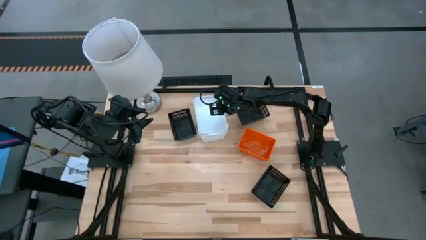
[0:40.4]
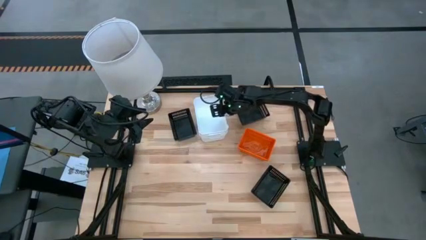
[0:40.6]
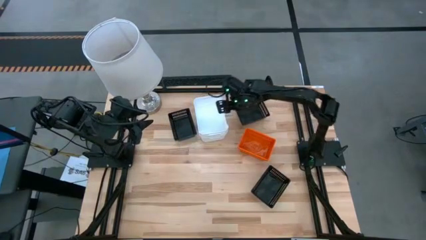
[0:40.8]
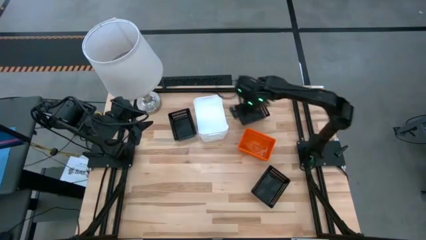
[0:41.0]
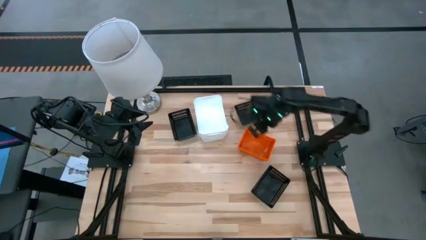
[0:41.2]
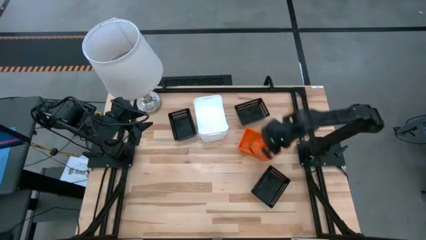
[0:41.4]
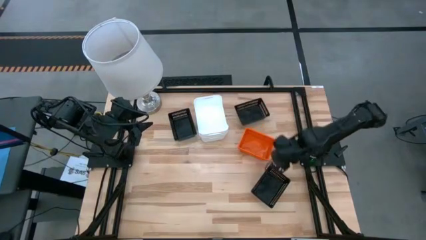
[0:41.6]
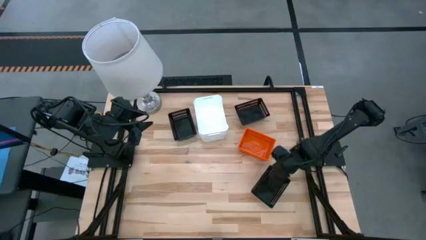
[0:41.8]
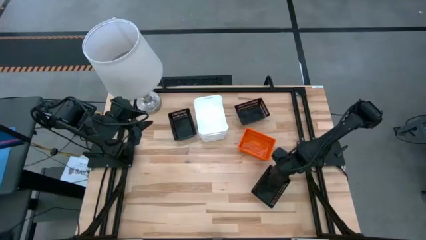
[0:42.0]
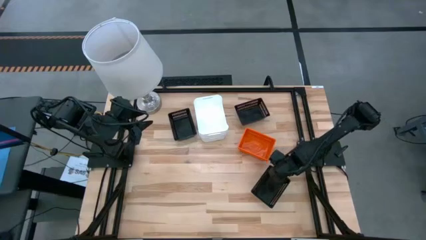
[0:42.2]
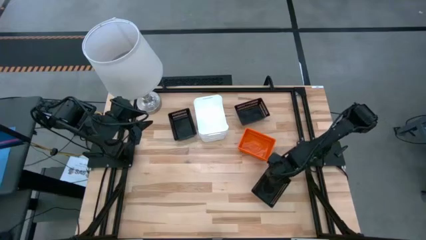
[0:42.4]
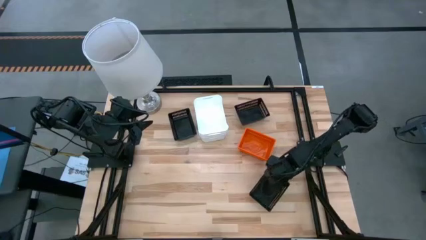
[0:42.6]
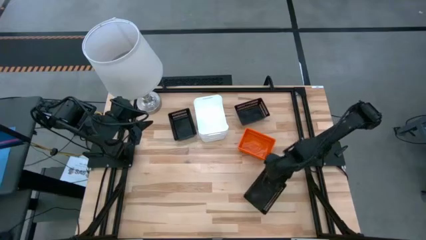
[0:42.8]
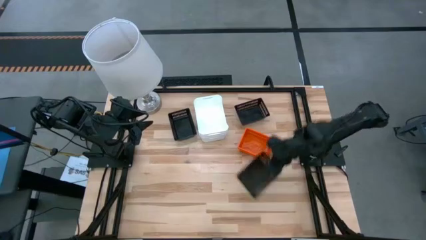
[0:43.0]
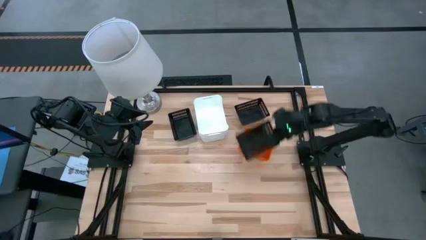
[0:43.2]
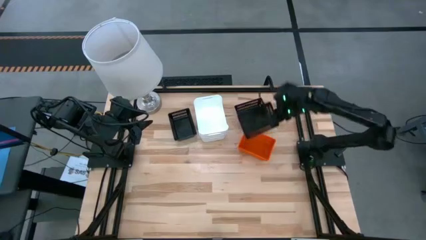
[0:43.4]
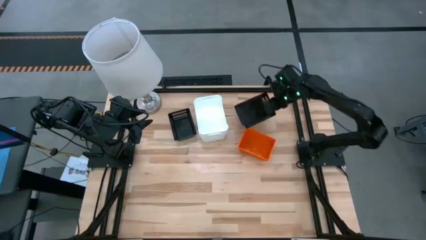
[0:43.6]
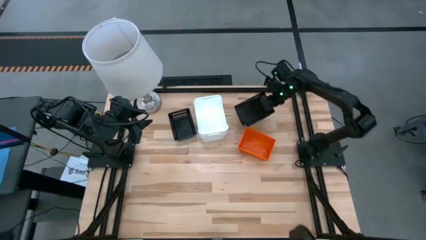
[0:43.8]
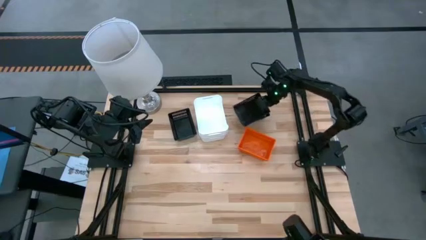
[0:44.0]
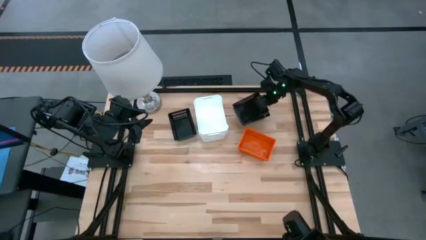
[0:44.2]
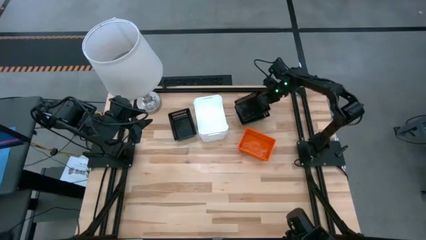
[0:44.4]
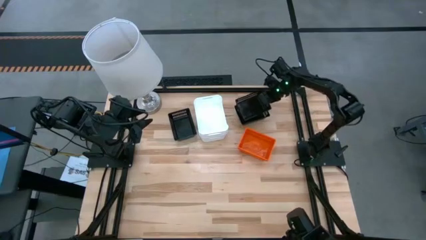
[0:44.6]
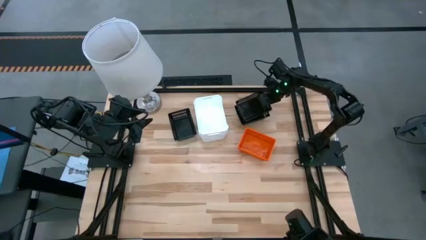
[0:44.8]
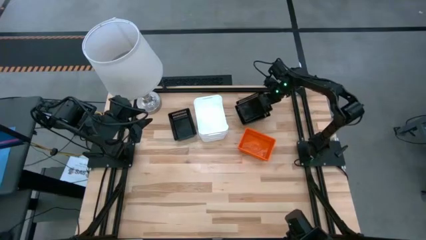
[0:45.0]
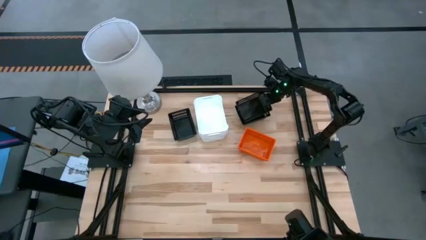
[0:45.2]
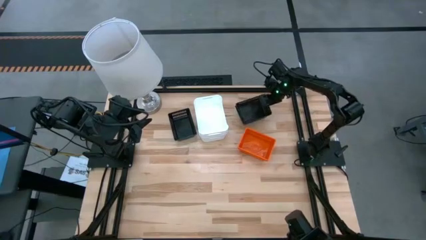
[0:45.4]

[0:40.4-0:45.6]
Stack the bottom black bin on the top right black bin

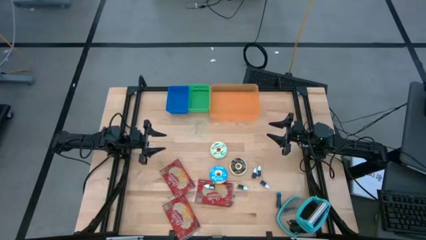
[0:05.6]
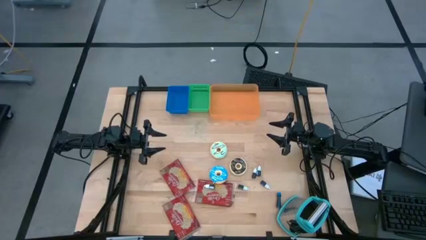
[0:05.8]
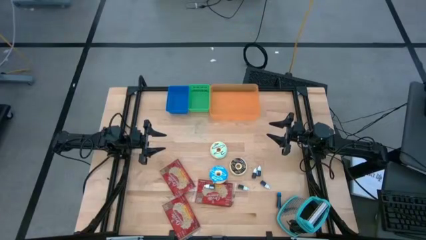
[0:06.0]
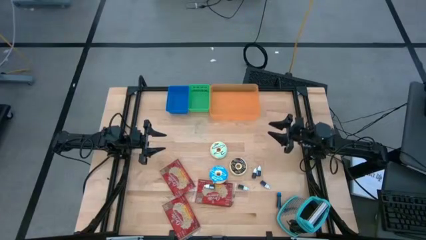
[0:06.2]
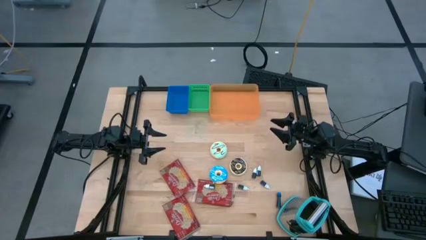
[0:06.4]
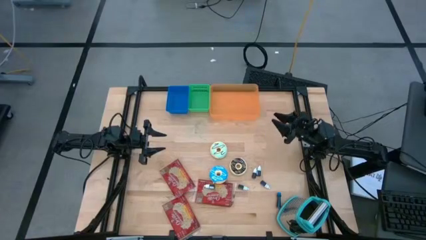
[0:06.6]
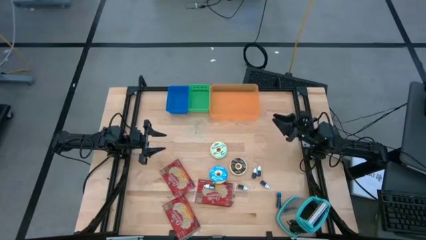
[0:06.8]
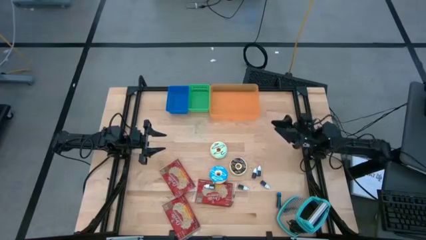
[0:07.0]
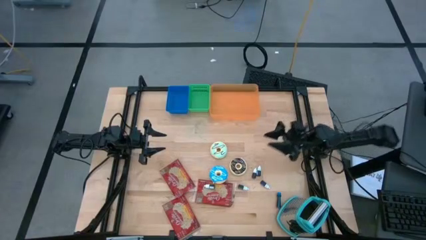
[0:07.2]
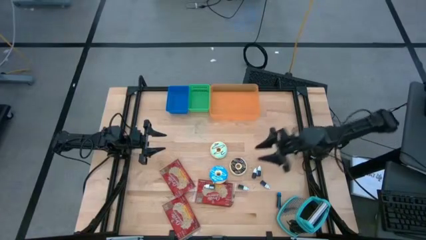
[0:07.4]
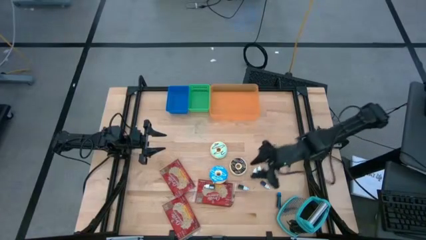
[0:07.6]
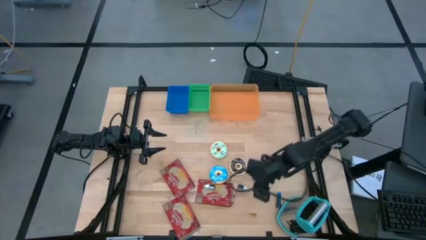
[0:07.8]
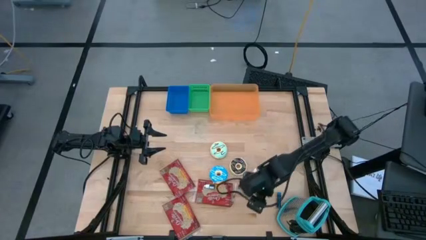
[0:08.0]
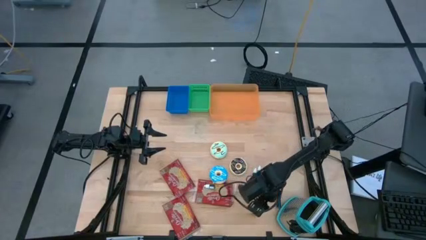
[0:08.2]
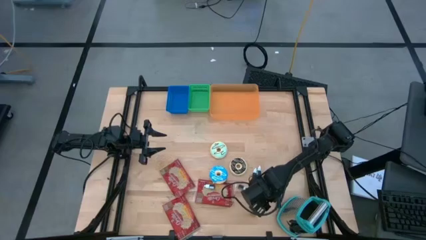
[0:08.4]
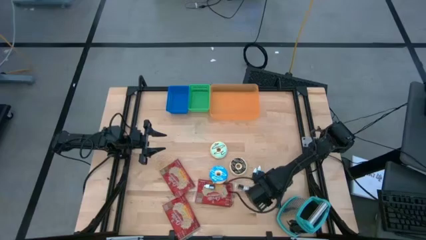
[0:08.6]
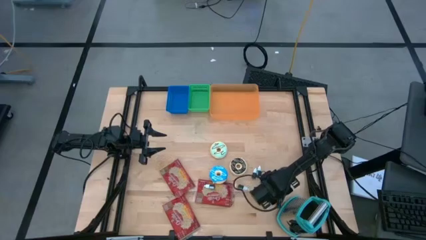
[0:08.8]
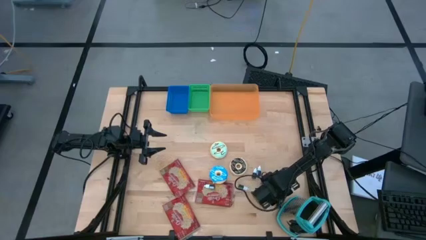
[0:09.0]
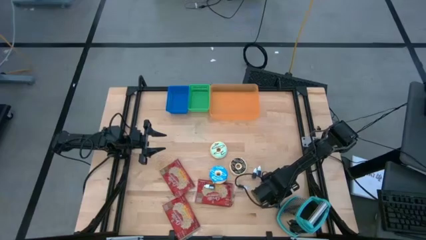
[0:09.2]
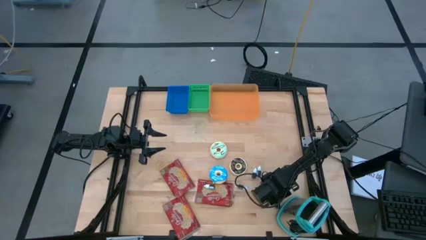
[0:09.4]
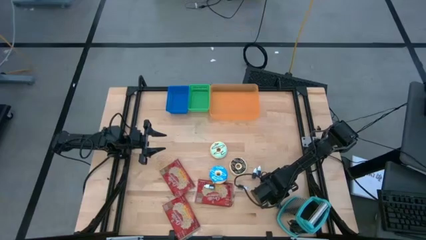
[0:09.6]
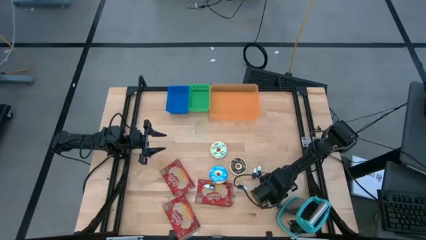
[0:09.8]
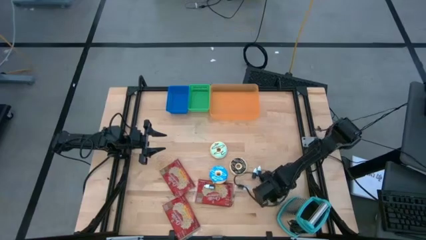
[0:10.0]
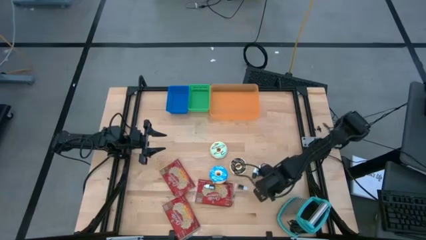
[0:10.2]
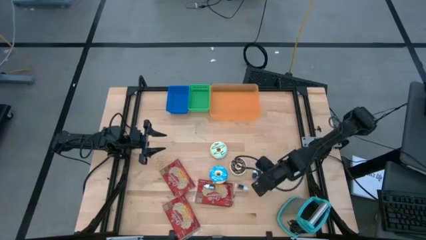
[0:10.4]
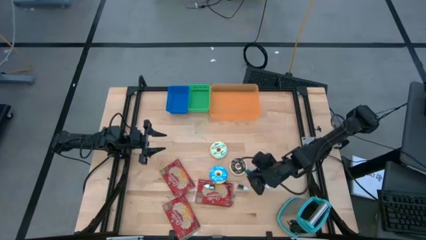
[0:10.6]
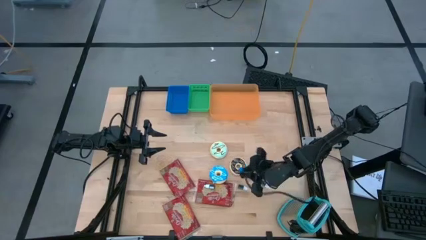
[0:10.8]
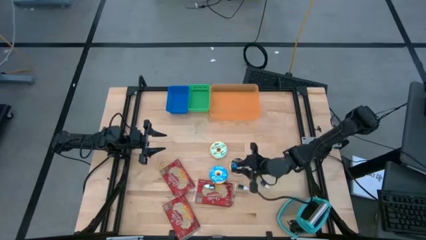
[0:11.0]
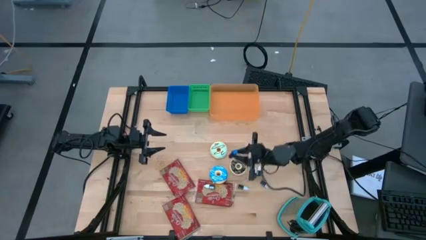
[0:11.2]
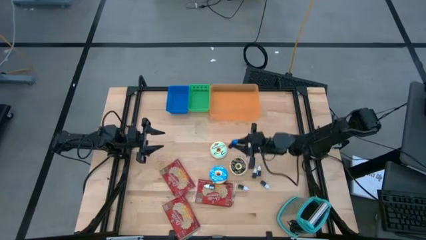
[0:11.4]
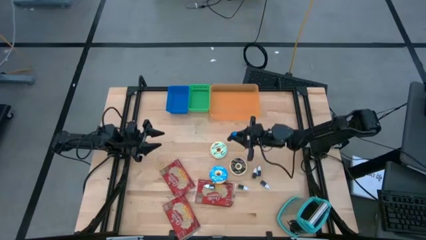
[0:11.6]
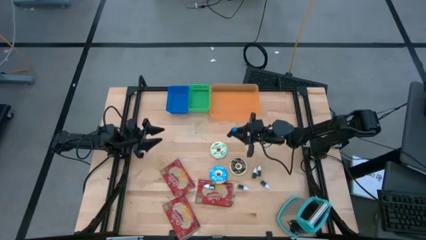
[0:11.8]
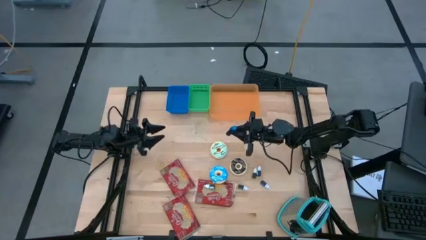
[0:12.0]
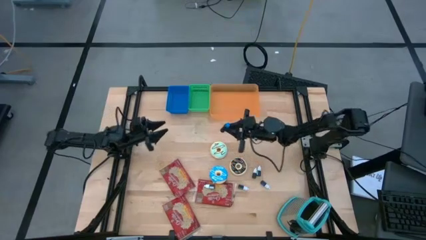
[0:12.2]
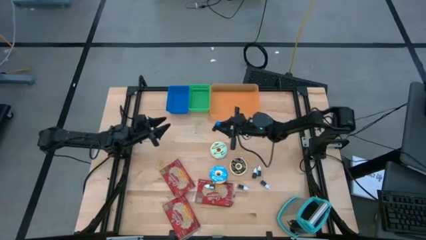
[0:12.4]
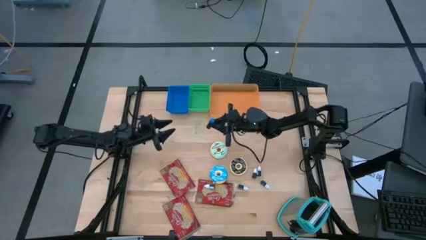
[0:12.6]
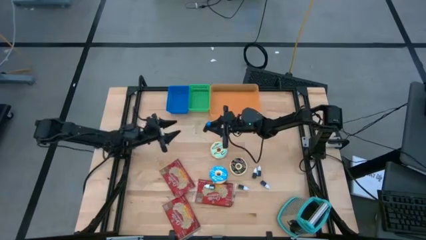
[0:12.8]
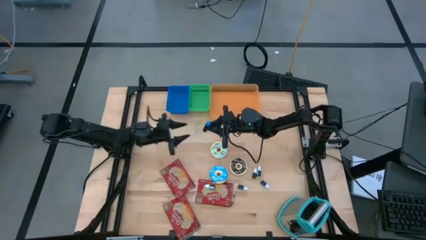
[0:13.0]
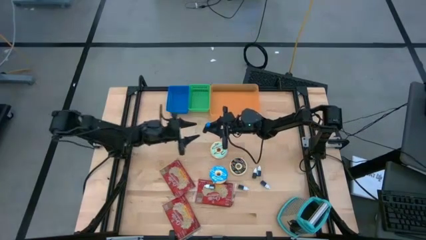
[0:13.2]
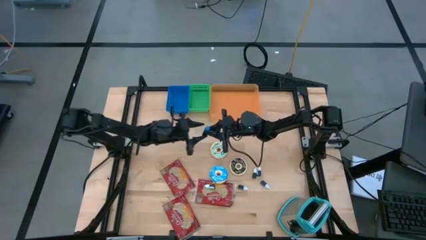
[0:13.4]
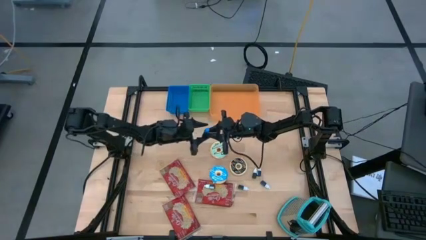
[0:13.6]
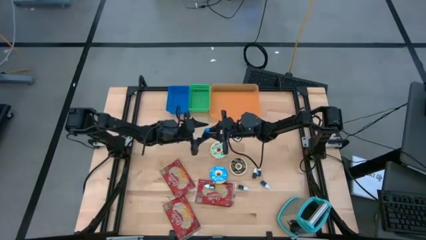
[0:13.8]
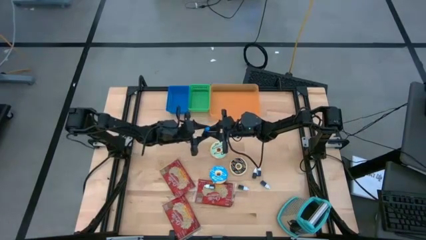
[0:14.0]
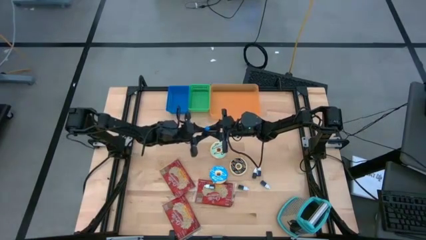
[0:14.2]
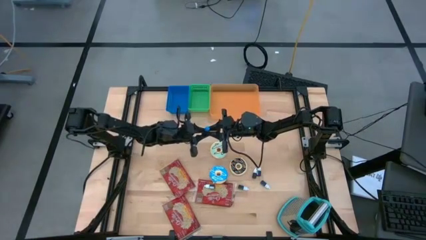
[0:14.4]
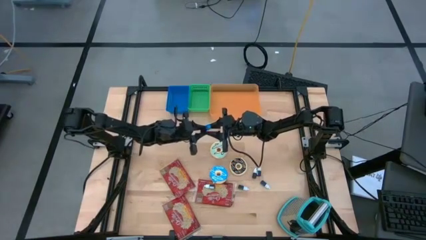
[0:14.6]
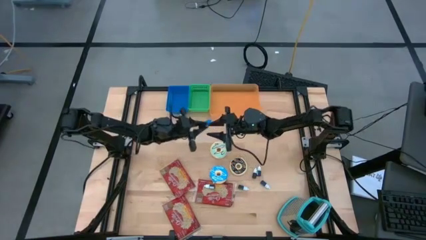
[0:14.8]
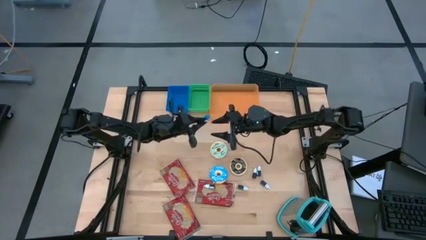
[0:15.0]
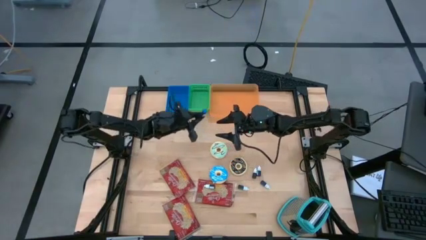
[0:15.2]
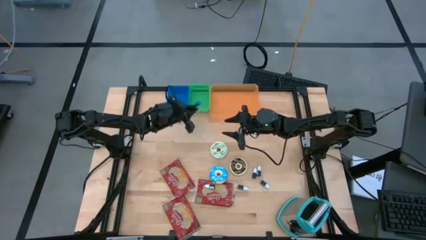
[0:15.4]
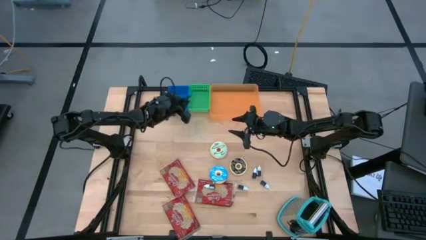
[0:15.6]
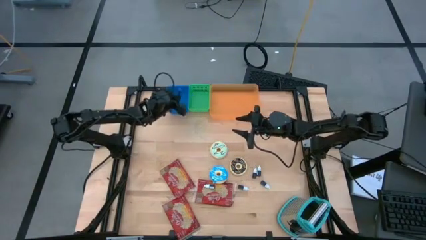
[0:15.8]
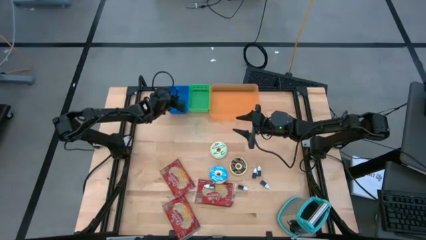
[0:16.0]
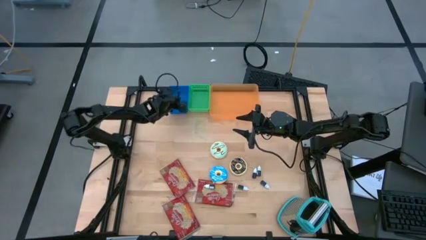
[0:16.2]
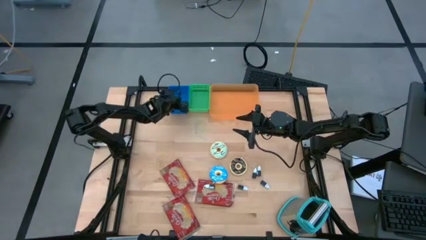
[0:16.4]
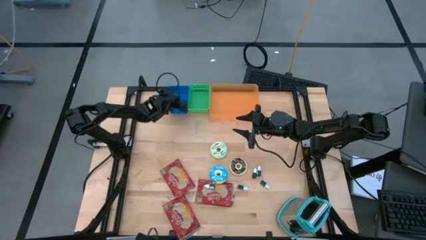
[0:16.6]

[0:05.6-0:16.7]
Put the blue food coloring bottle into the blue bin
